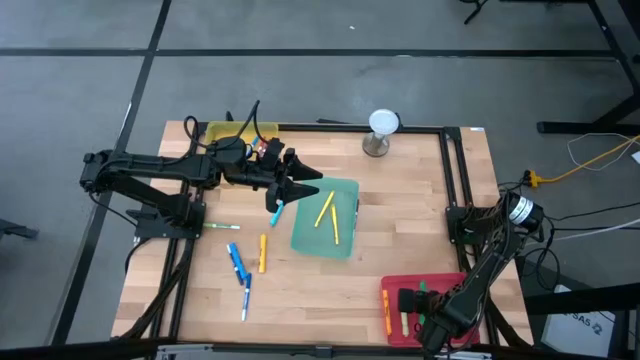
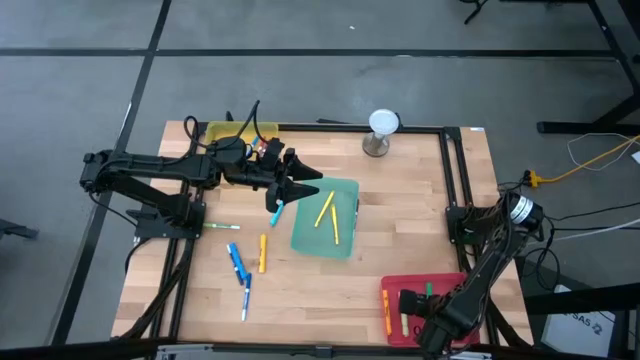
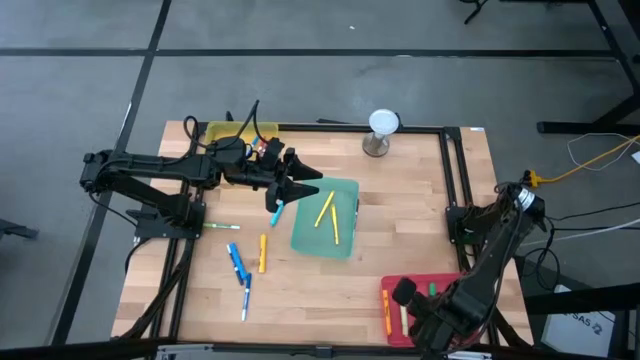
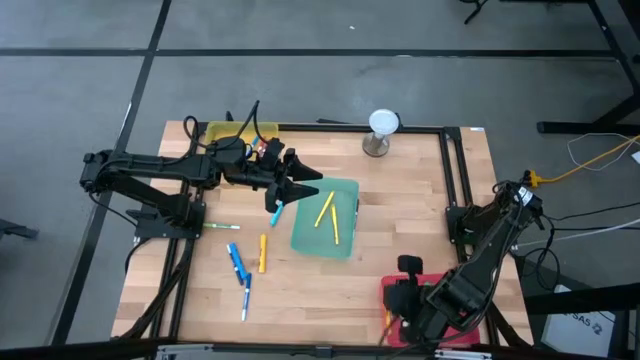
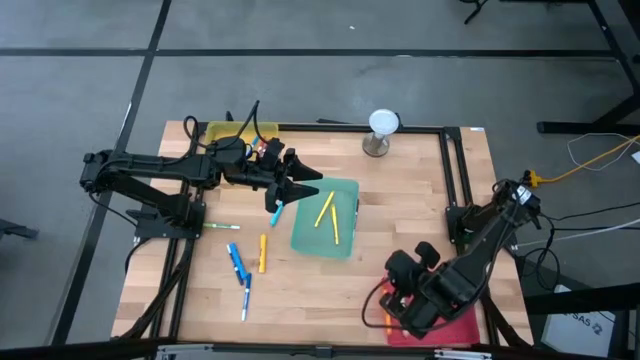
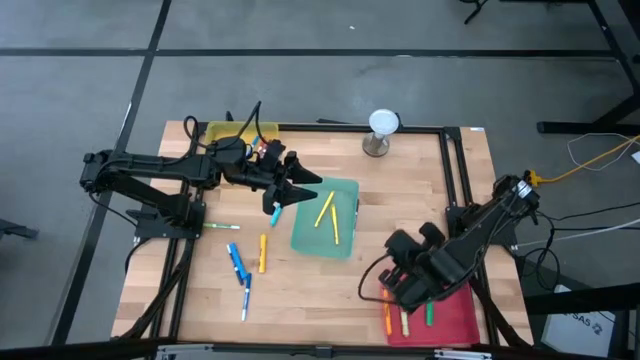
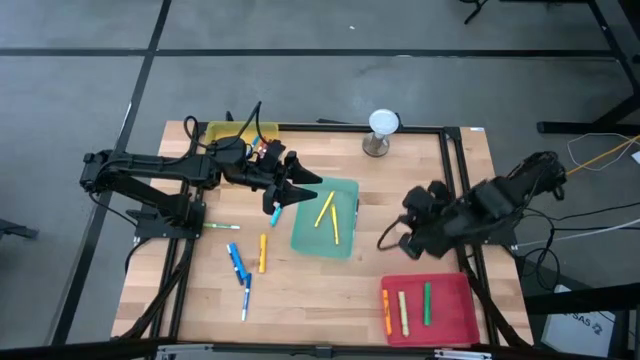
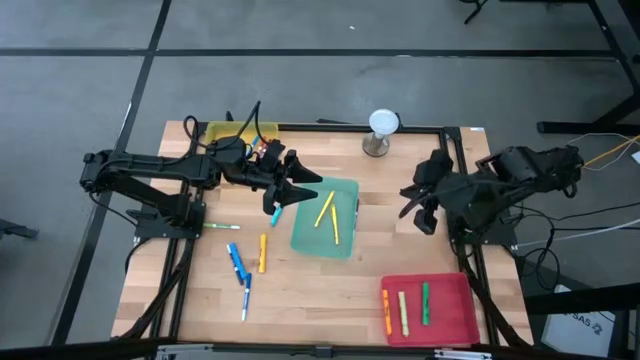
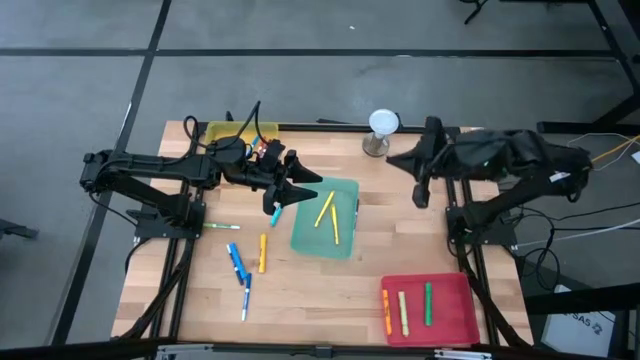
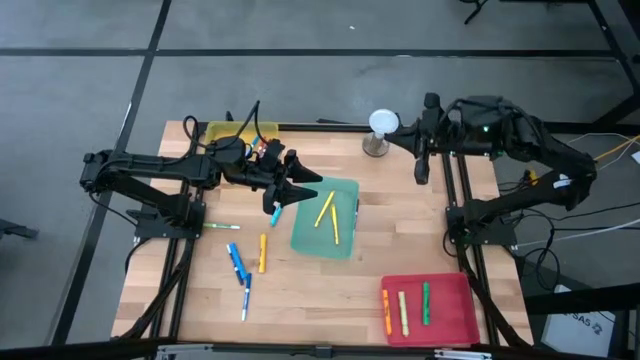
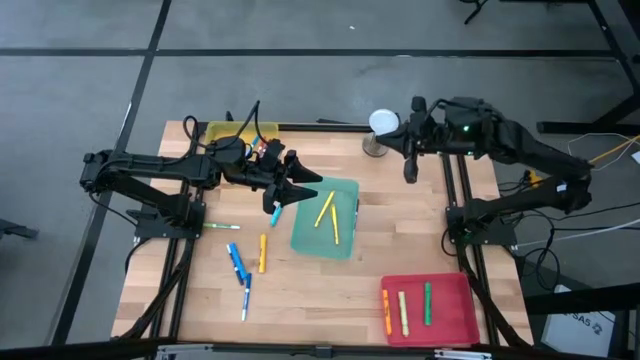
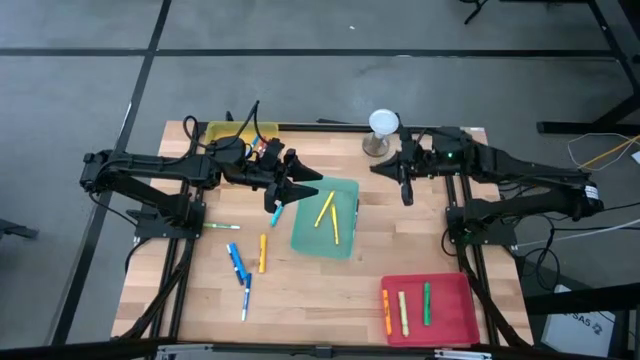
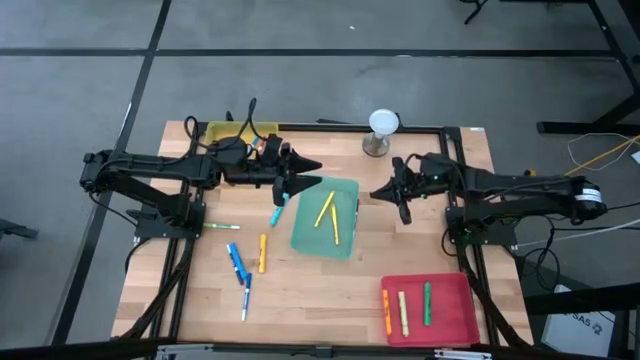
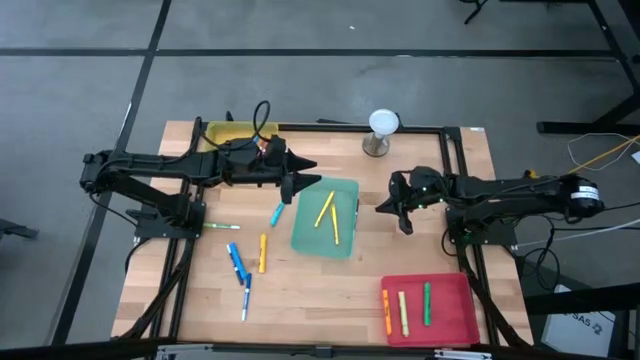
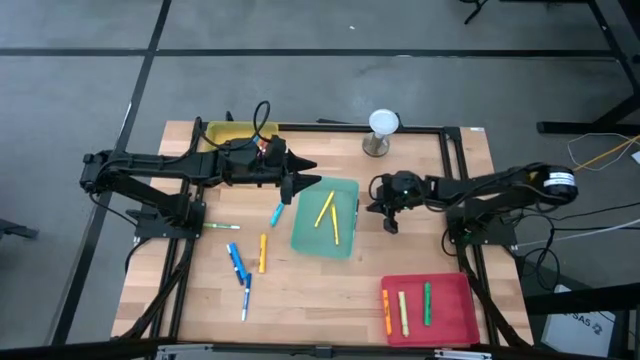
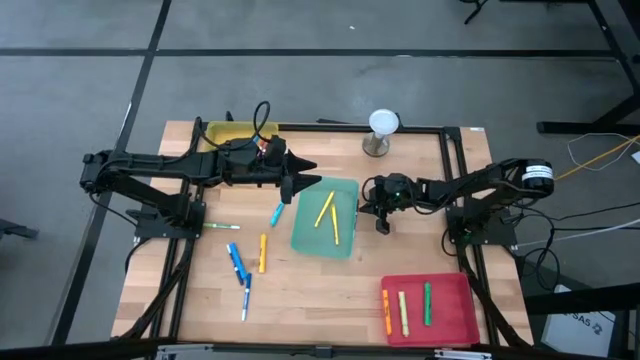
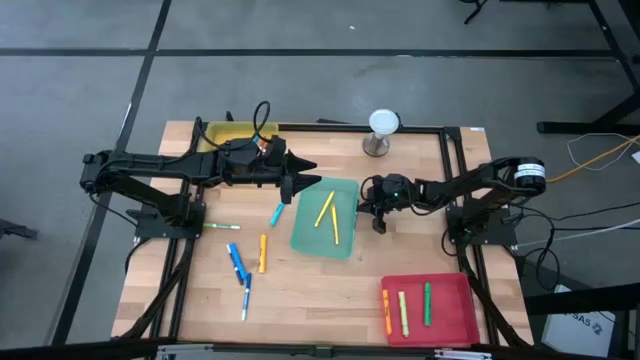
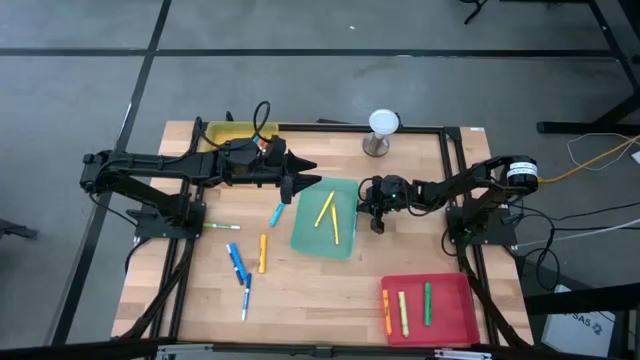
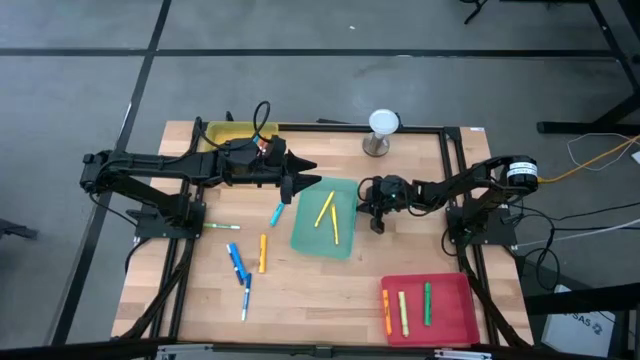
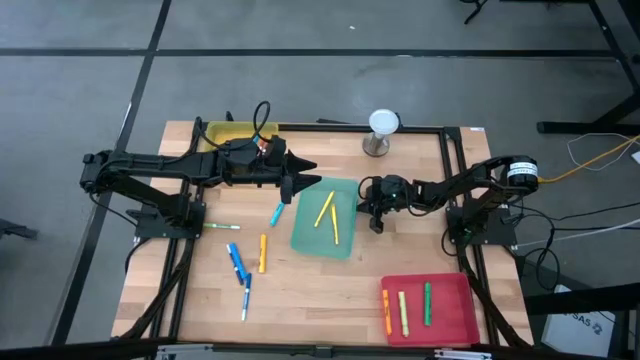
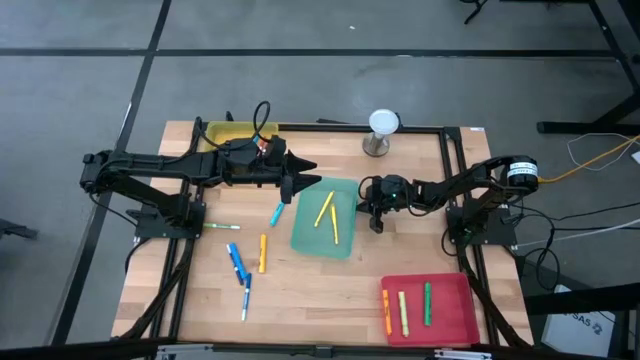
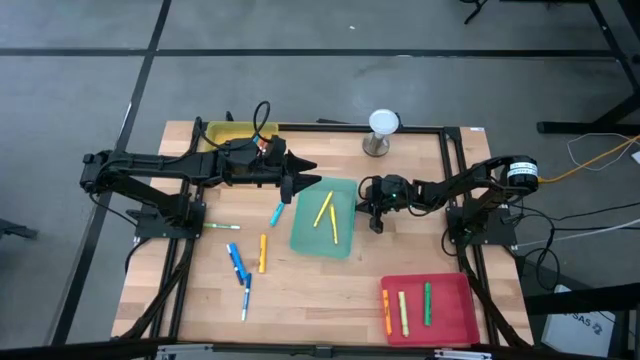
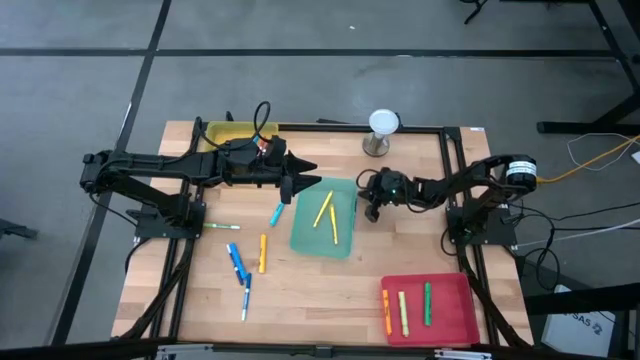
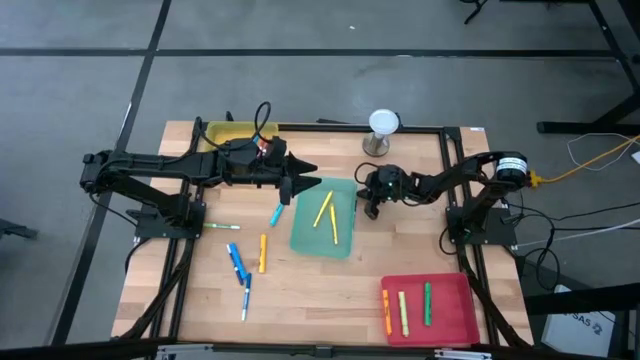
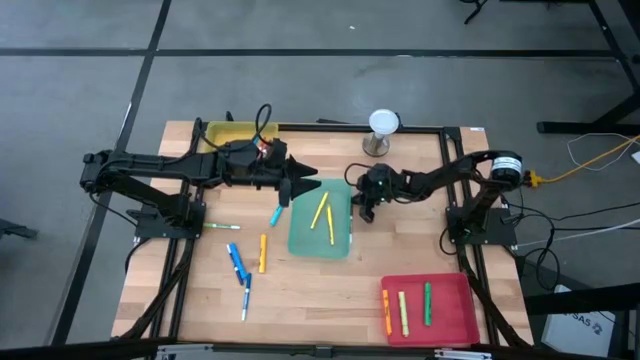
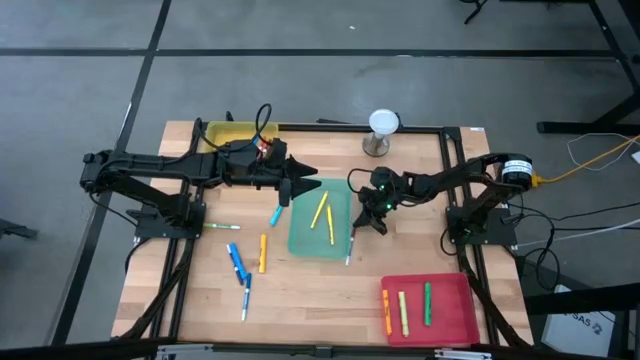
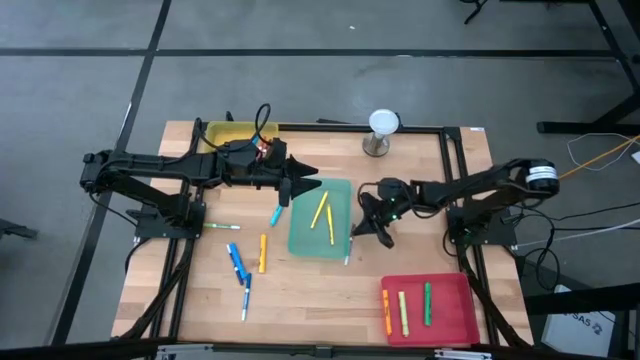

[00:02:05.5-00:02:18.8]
Task: Pick & Place Markers
Put the brown marker pen into the yellow bin

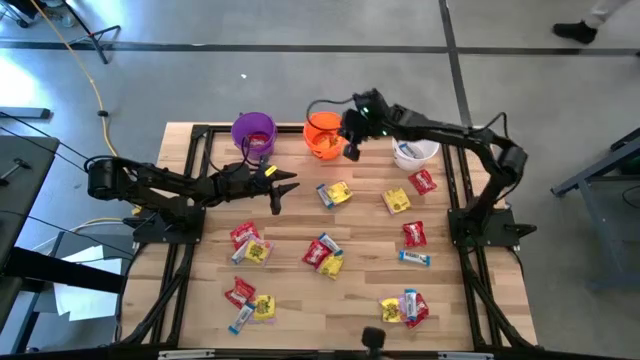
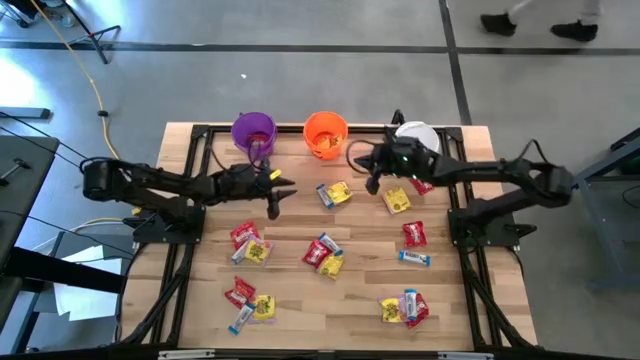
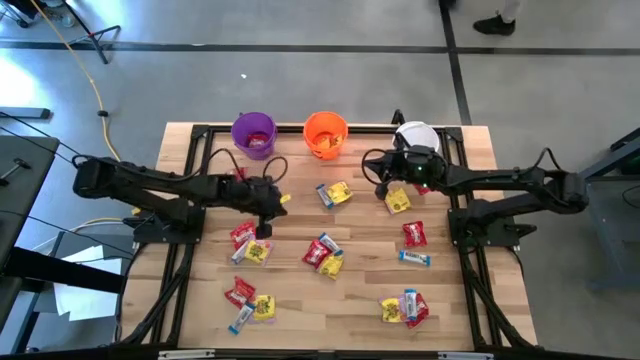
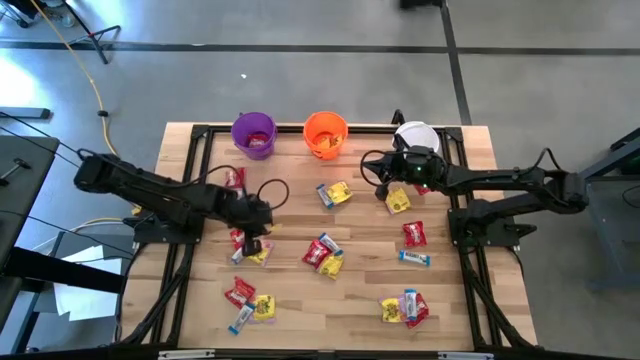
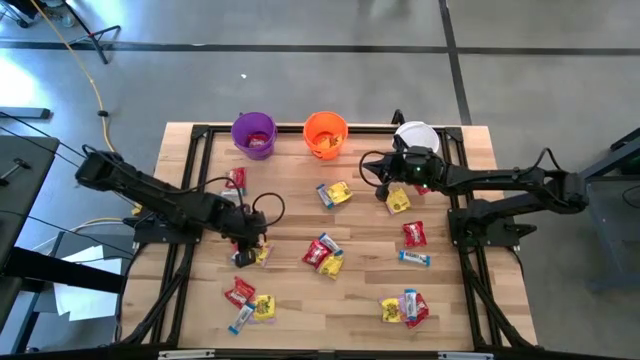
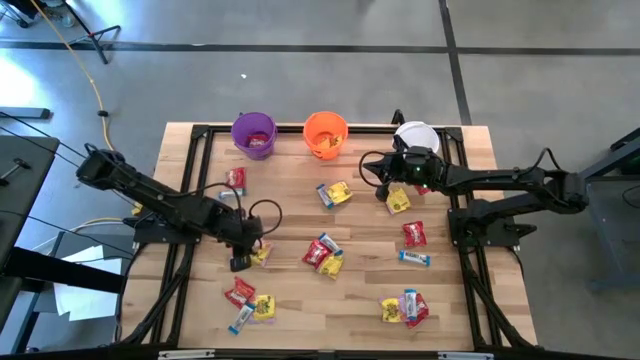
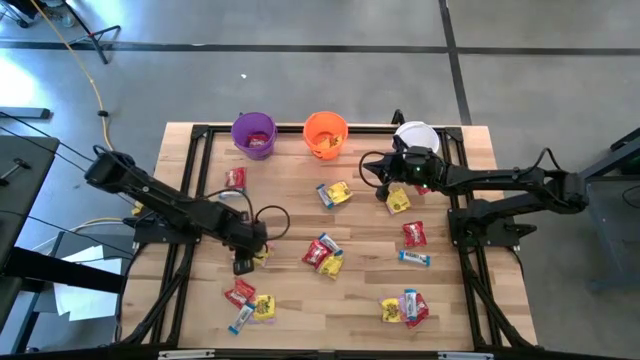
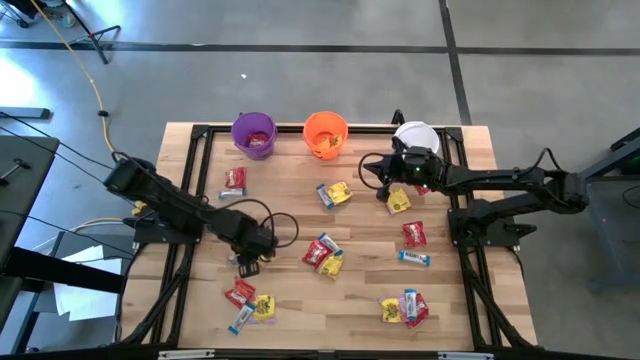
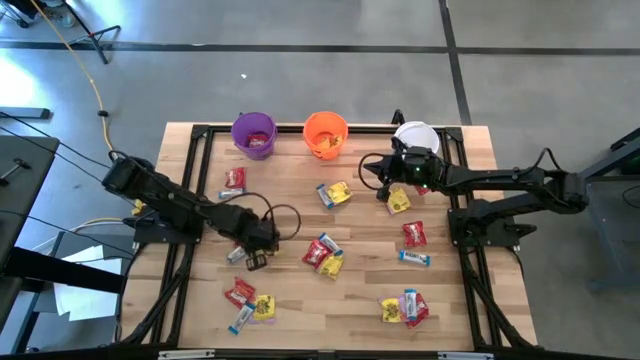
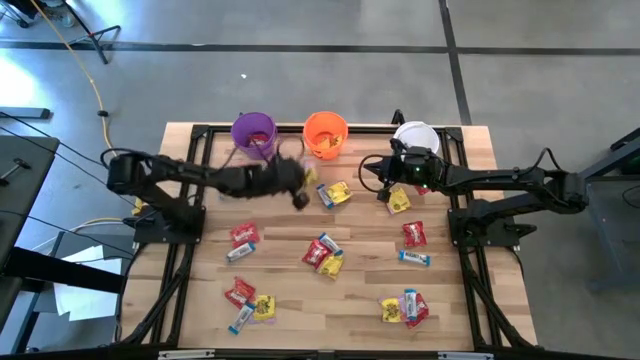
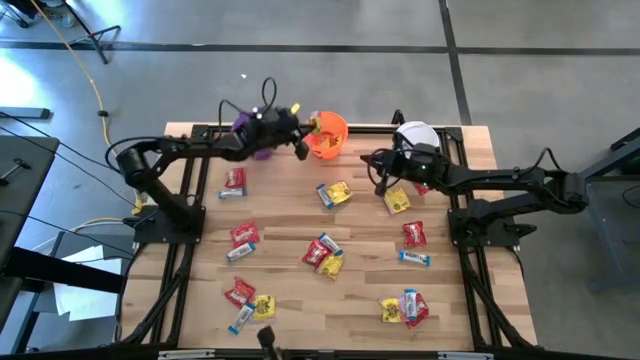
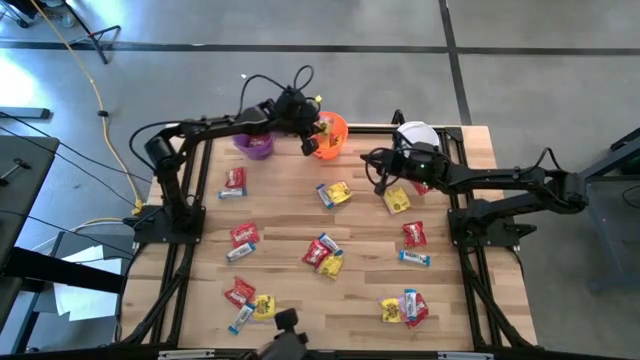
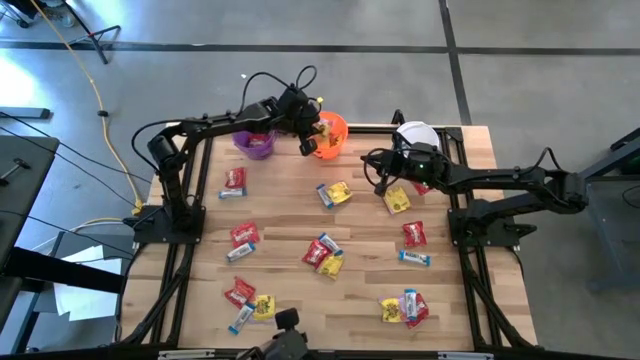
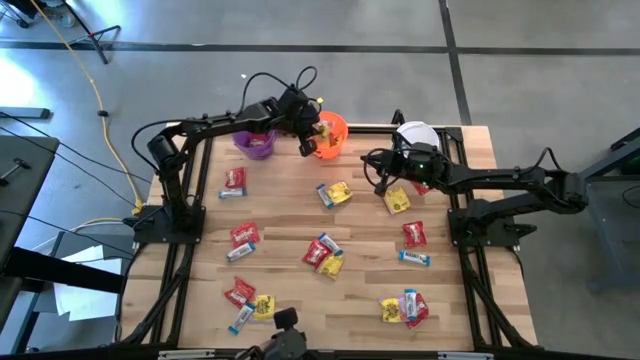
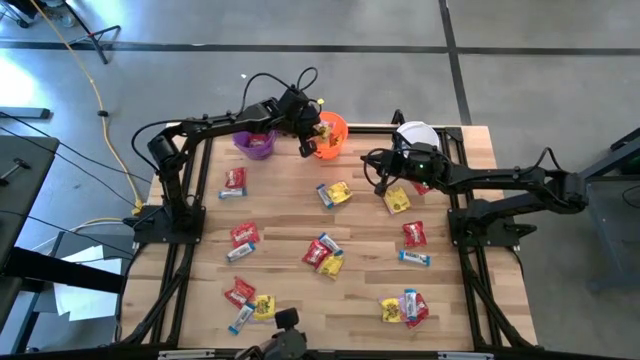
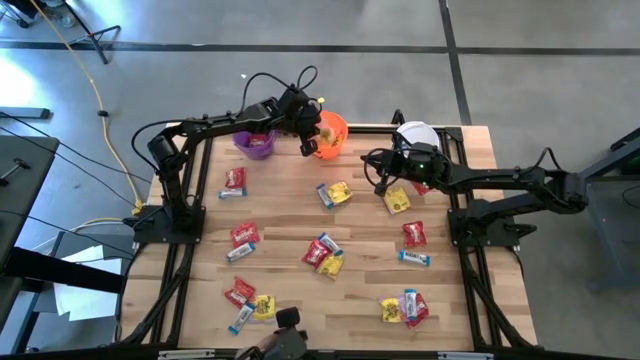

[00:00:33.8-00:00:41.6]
Task: Sort candy
Put the yellow candy into the orange bucket
